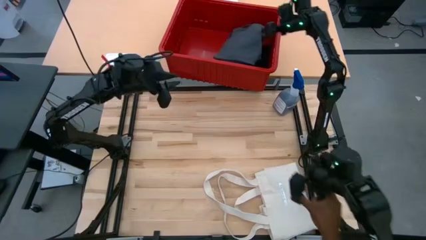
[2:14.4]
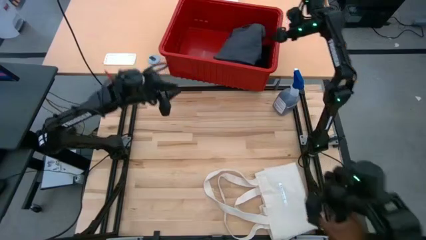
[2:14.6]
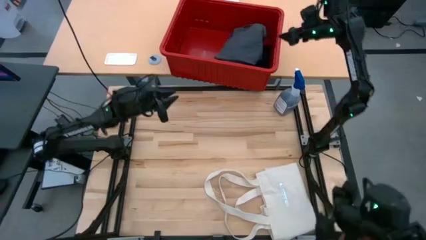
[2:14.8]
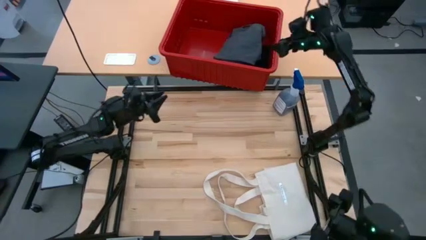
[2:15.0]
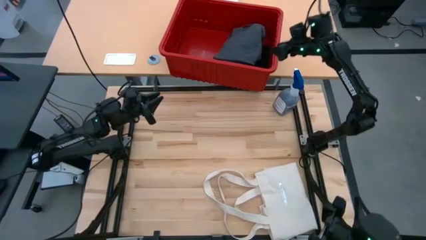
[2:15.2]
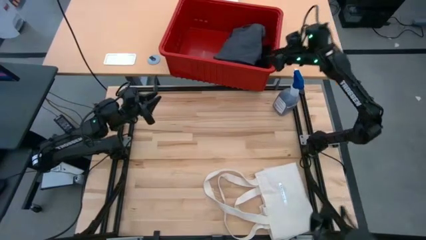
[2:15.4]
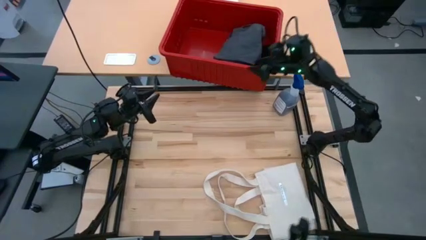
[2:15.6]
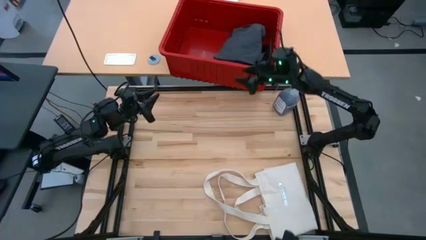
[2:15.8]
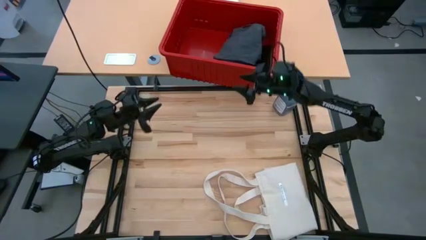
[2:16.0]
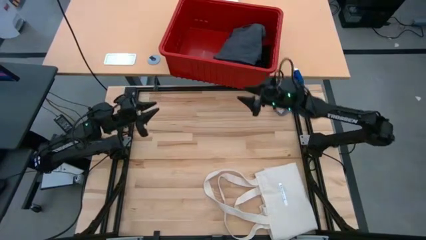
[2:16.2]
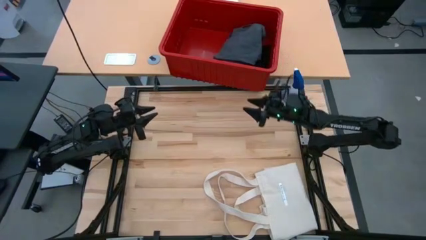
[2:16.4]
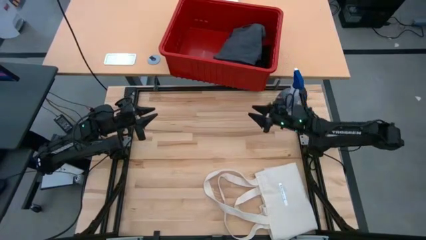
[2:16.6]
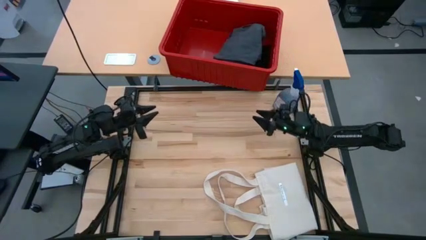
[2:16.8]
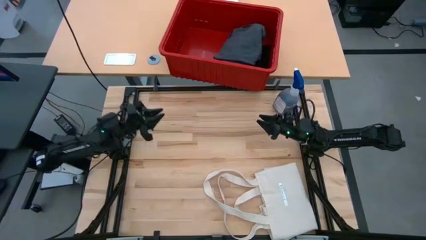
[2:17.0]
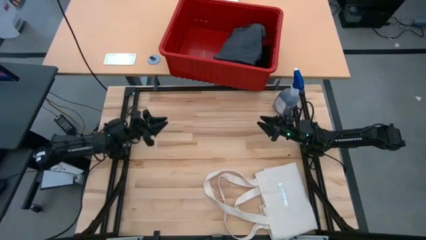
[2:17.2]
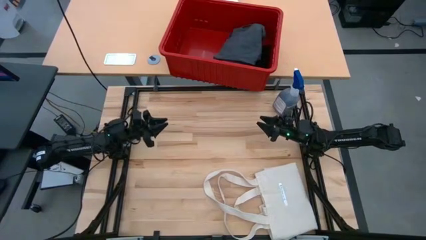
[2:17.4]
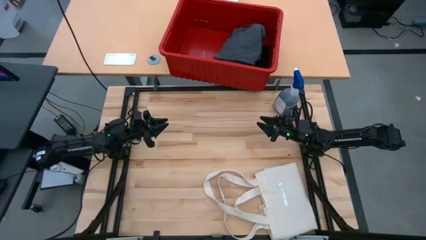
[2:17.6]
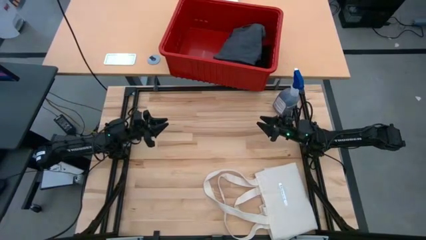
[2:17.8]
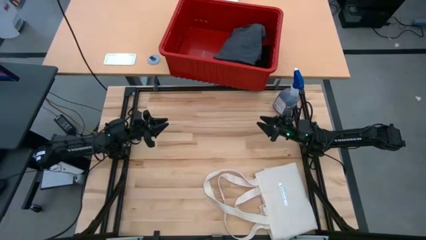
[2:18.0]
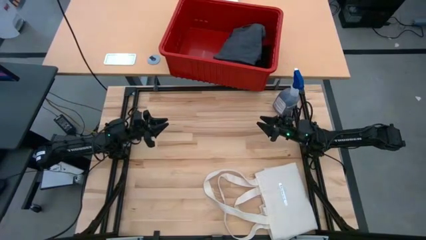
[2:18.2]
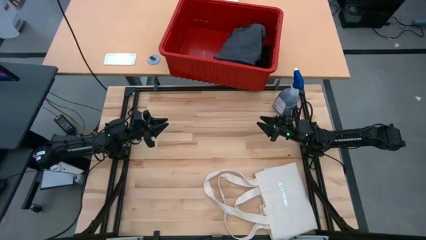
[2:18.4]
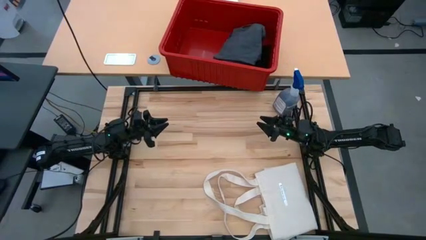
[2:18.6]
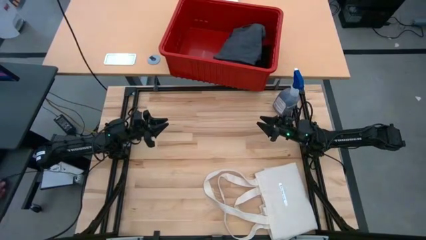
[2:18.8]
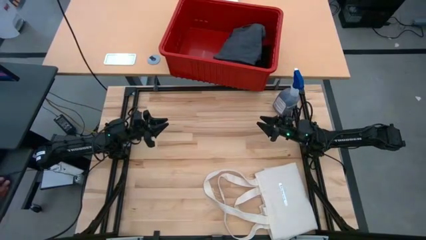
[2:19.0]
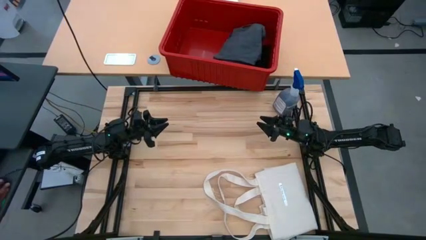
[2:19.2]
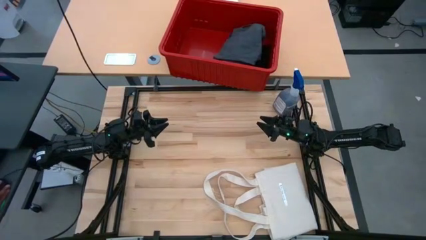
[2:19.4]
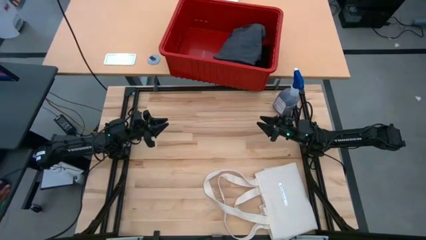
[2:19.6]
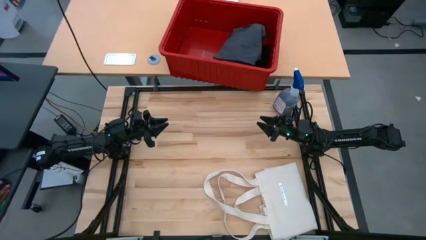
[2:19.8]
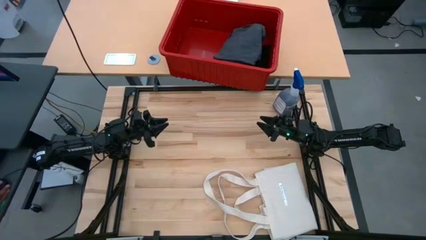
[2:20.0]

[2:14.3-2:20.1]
Task: Fold laundry
Return to Home Position

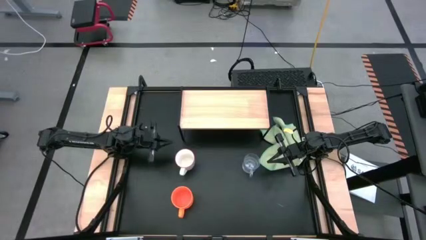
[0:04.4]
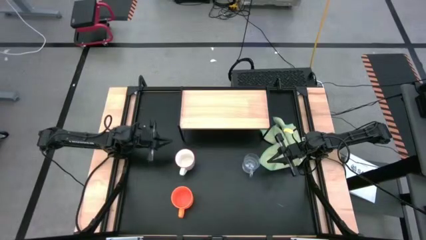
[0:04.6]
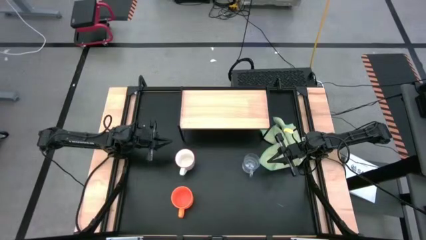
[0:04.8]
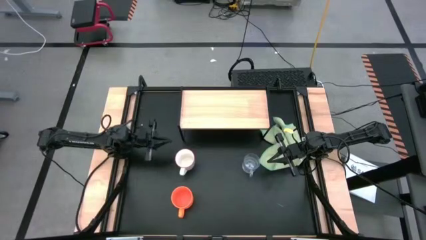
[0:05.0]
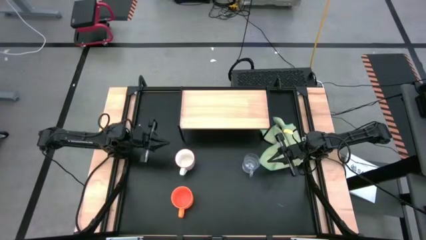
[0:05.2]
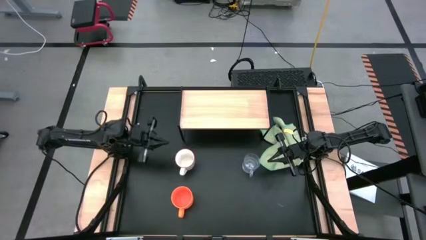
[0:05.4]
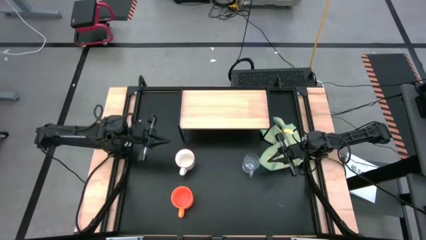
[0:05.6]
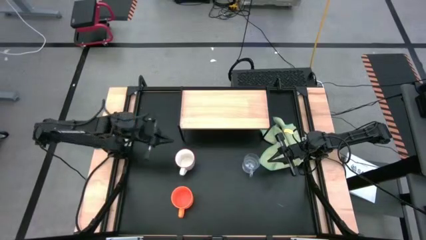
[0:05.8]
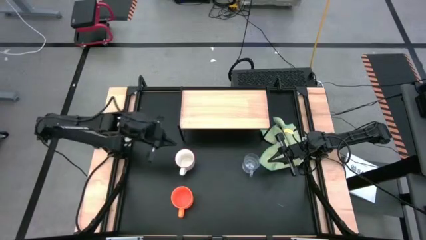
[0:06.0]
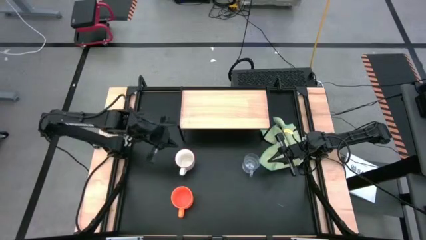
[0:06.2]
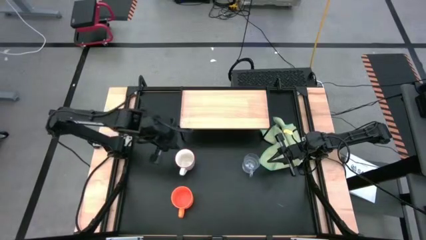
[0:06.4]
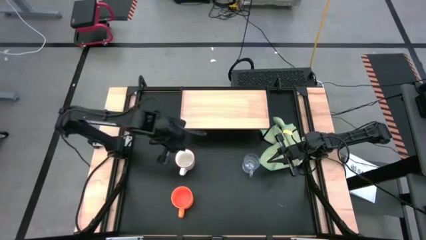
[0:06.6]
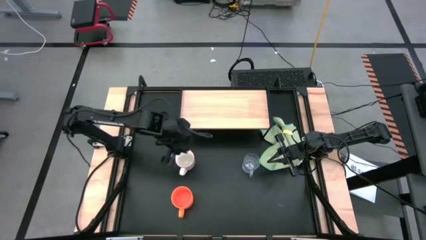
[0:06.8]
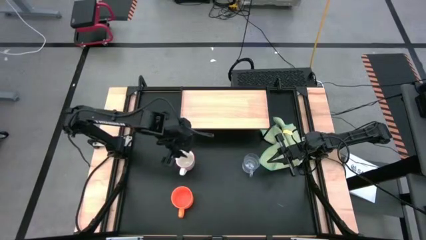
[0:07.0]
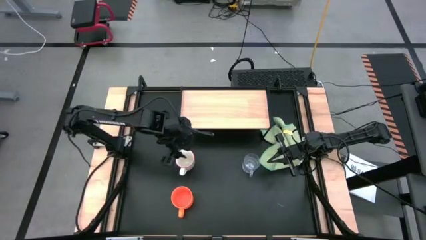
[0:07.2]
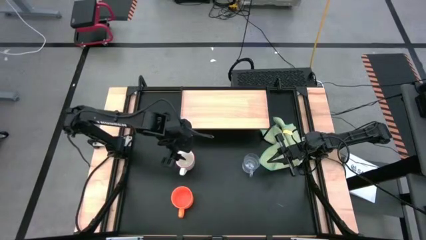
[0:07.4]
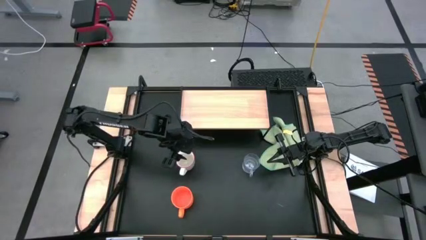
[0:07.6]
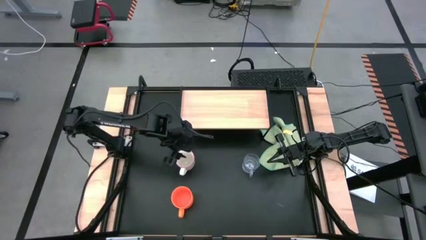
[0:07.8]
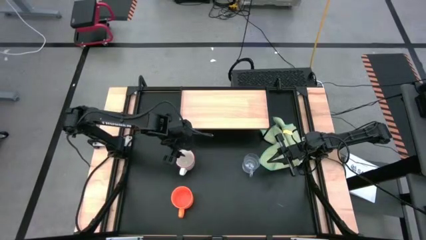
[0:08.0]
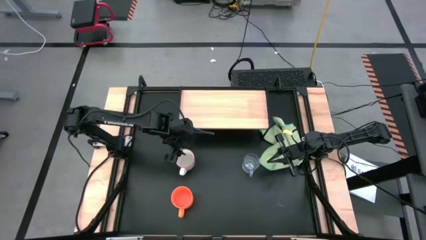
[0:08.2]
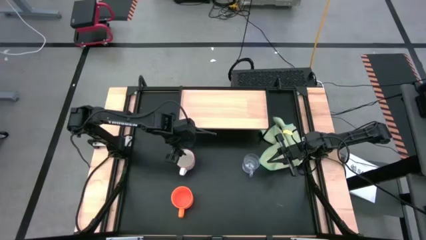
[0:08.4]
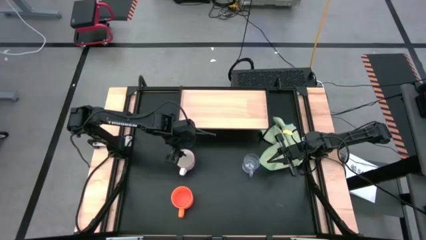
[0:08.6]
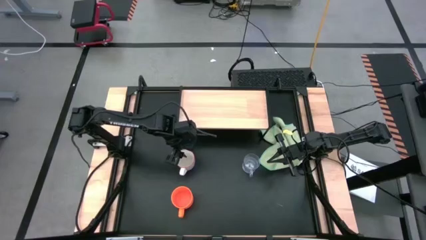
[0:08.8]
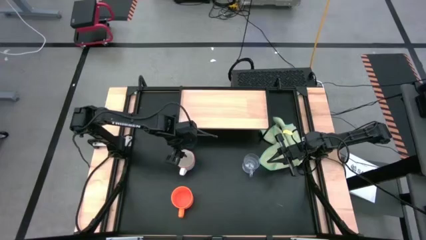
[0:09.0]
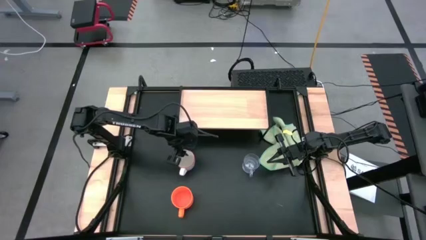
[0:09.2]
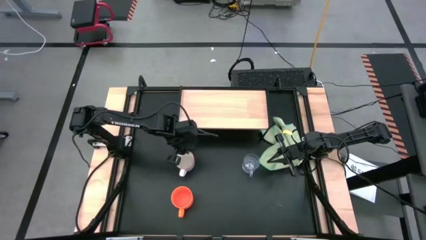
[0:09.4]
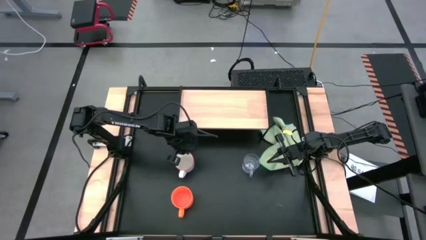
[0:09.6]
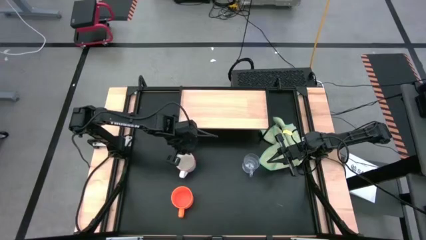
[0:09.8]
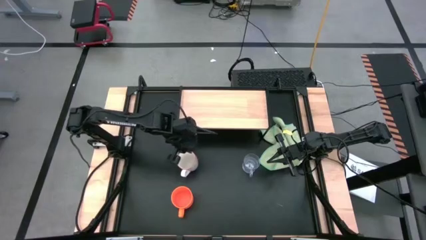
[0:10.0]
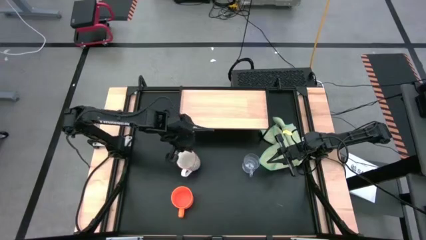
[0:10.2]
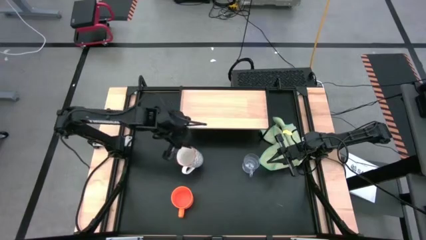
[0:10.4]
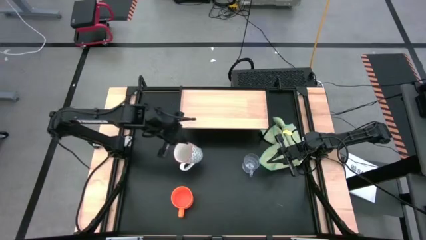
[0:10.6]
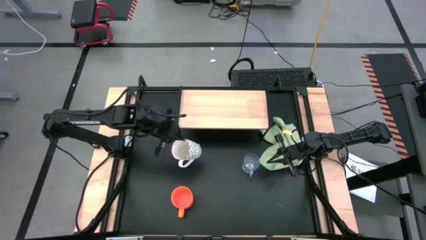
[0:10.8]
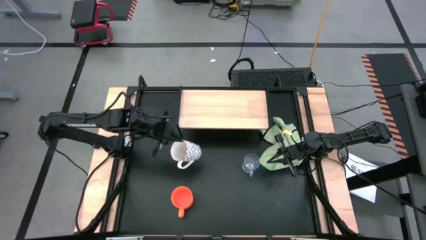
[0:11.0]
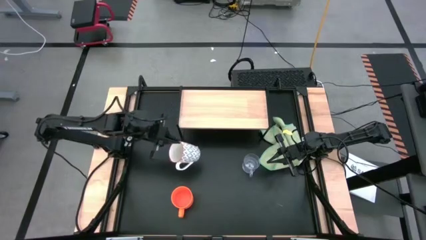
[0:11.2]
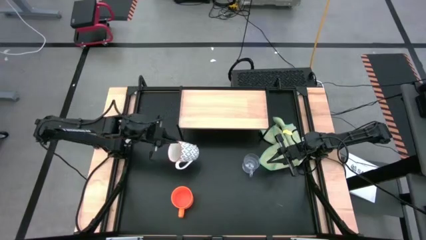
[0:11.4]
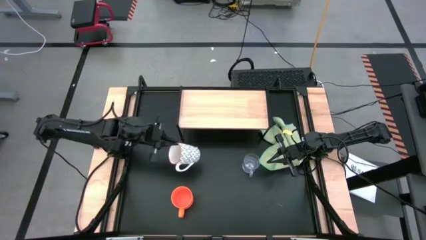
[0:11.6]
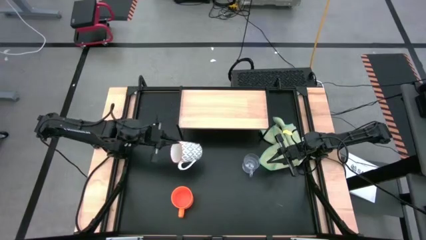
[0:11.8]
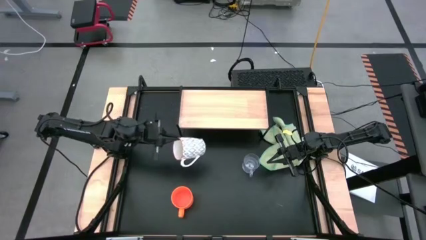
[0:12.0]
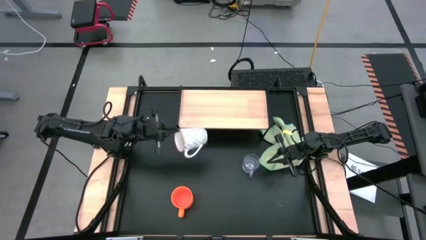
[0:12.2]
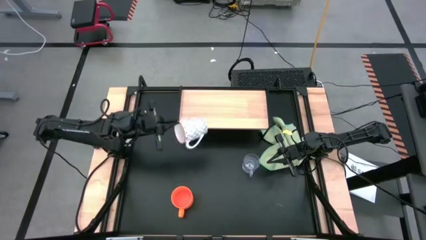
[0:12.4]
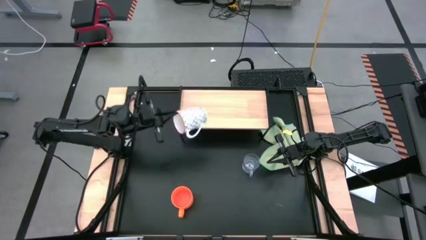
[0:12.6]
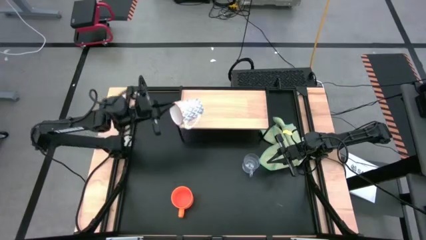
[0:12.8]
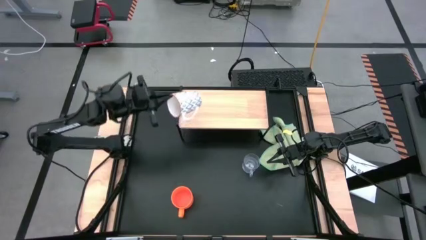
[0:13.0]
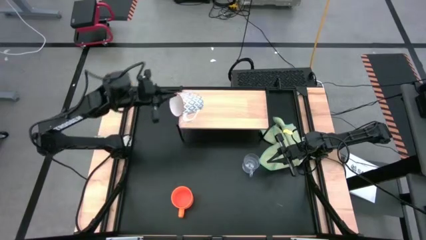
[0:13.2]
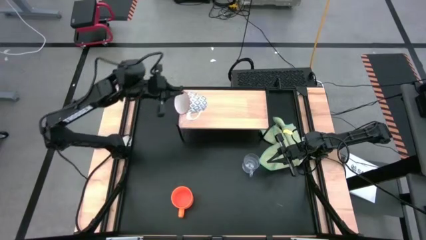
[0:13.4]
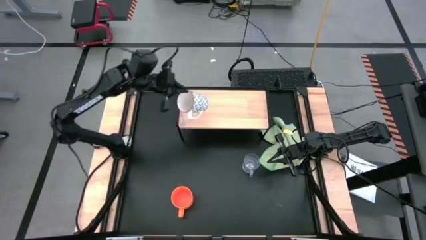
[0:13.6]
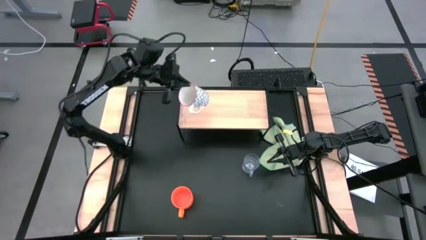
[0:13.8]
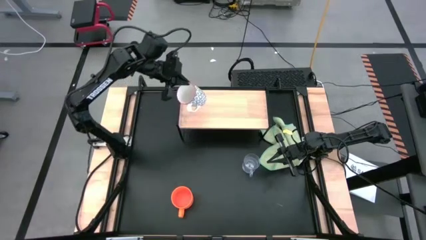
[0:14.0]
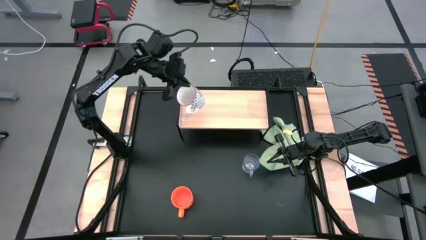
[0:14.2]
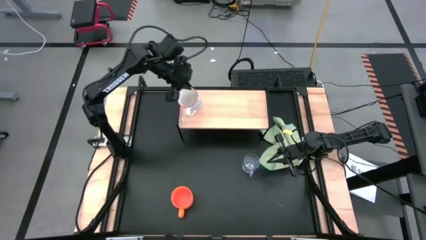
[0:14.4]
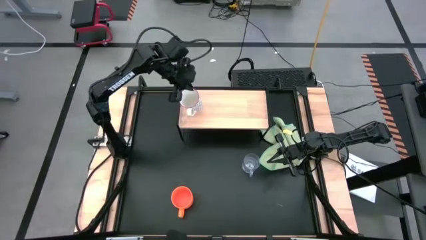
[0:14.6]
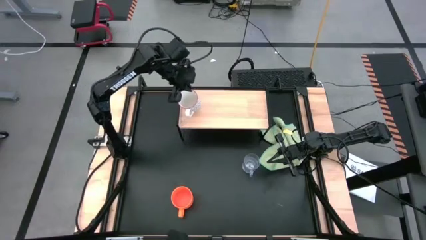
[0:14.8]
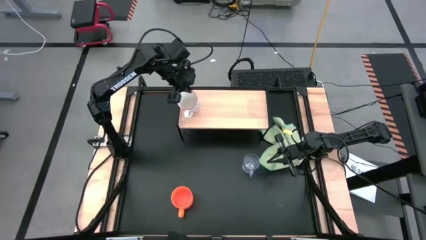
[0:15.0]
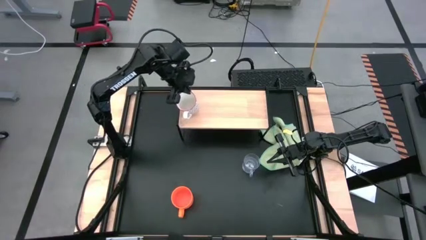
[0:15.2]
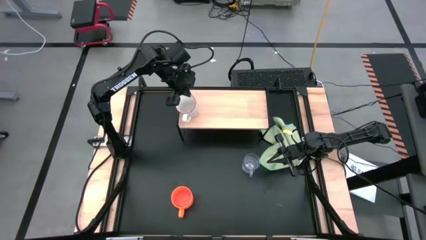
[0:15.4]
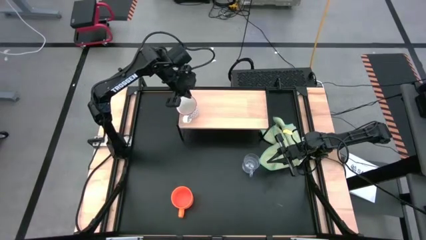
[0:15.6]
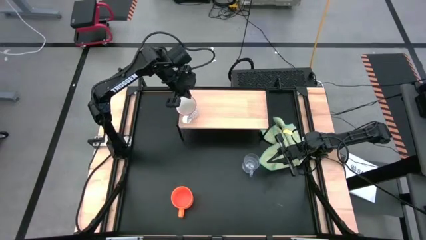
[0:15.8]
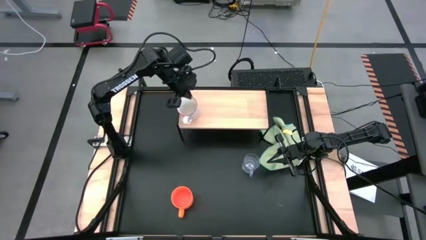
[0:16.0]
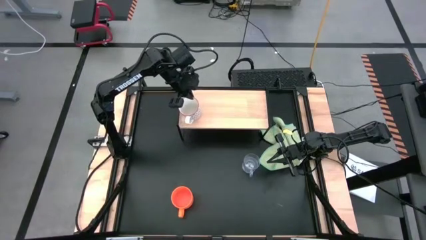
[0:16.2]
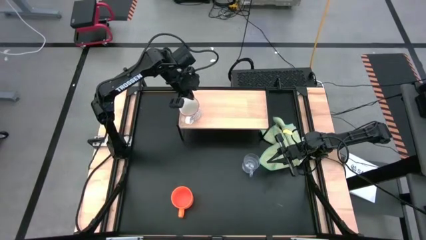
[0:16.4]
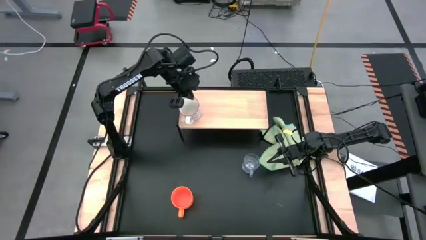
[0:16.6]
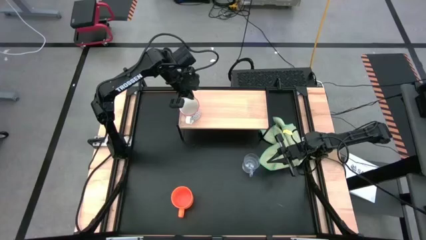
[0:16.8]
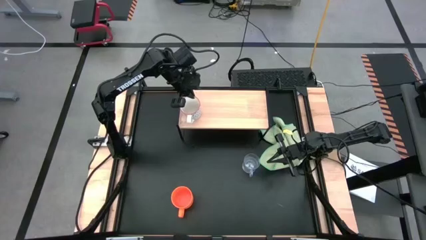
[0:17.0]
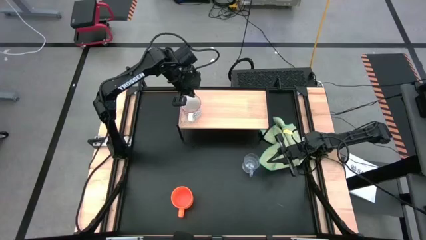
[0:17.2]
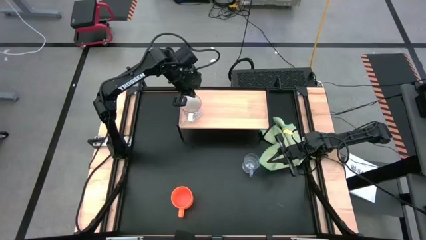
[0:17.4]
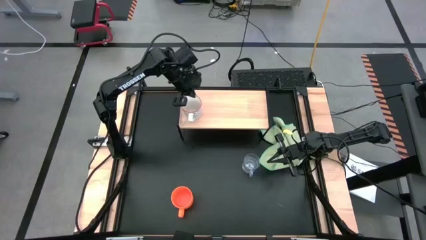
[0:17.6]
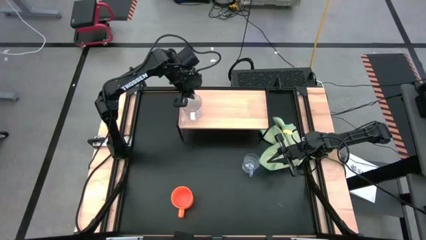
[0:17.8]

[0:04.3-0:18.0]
Task: Stack small to large cups/mugs on shelf
Put the gray cup on the shelf
